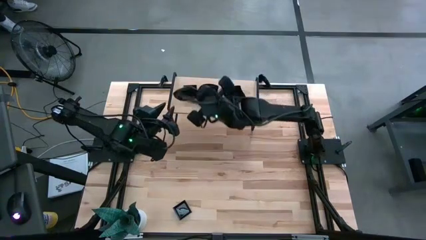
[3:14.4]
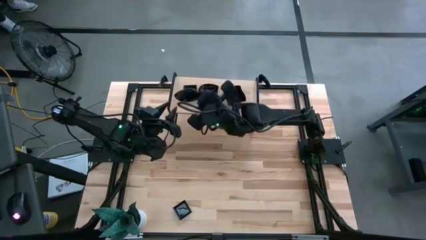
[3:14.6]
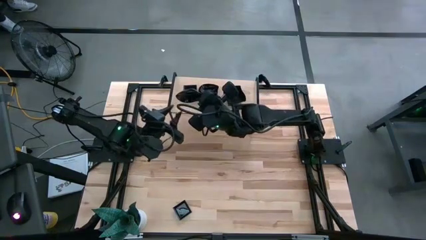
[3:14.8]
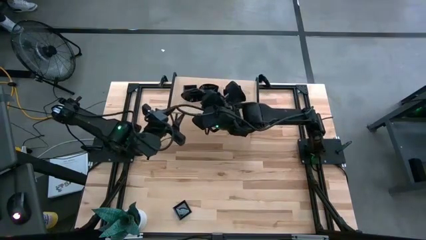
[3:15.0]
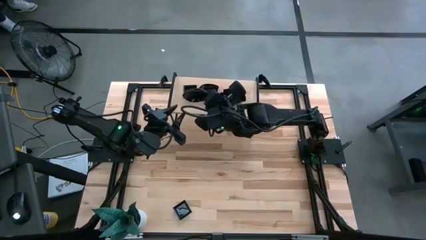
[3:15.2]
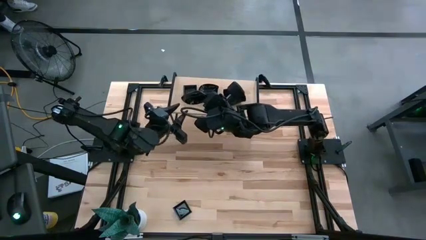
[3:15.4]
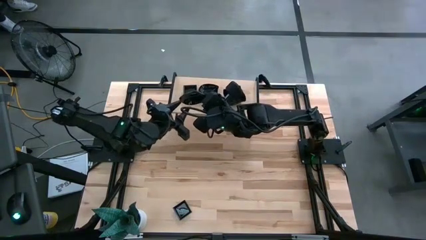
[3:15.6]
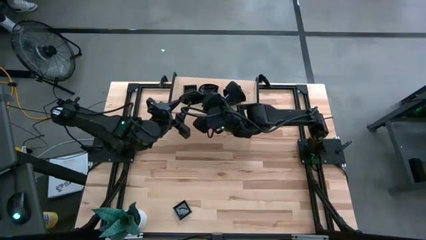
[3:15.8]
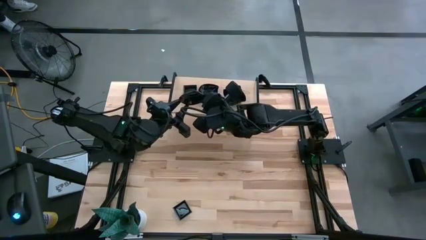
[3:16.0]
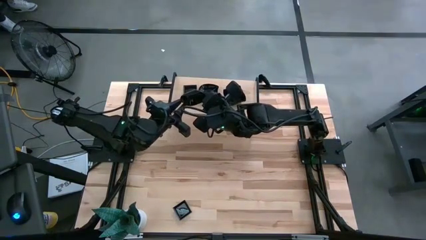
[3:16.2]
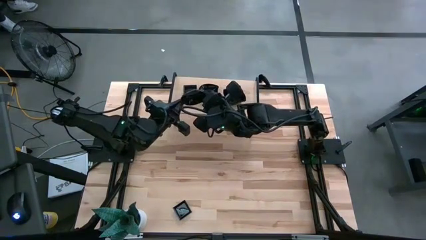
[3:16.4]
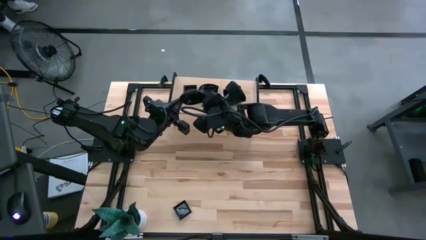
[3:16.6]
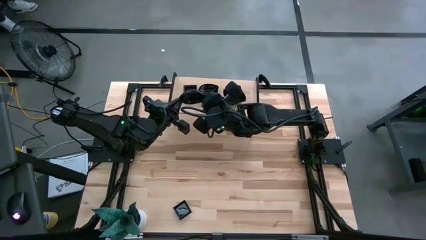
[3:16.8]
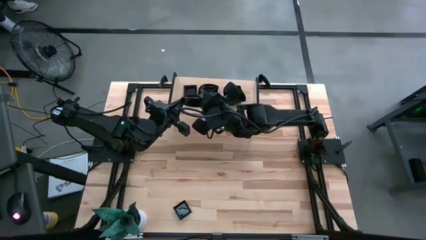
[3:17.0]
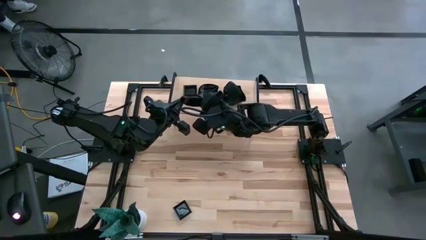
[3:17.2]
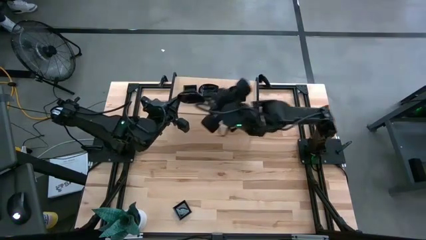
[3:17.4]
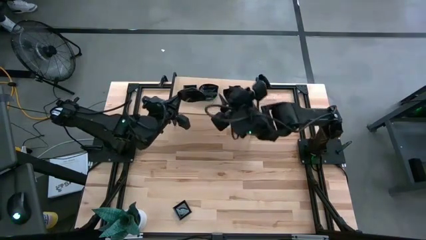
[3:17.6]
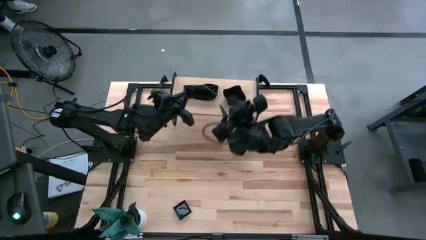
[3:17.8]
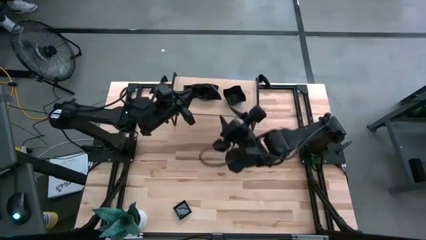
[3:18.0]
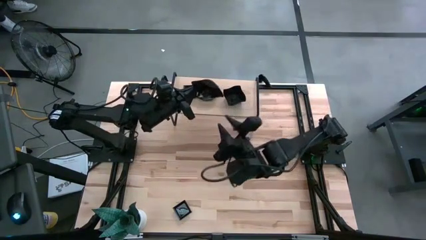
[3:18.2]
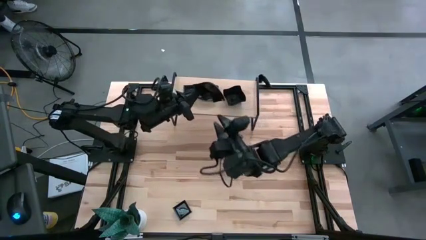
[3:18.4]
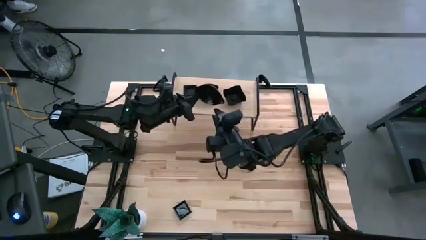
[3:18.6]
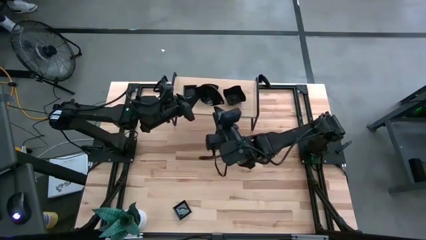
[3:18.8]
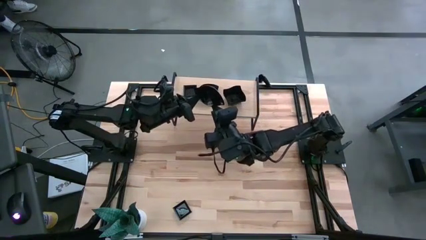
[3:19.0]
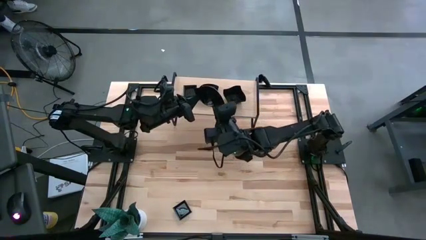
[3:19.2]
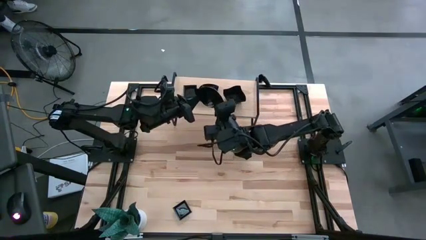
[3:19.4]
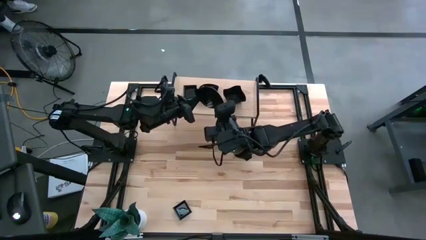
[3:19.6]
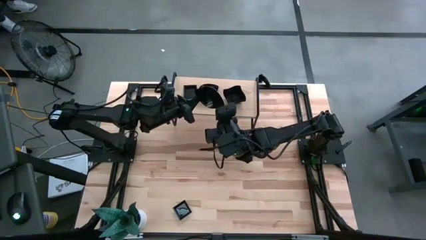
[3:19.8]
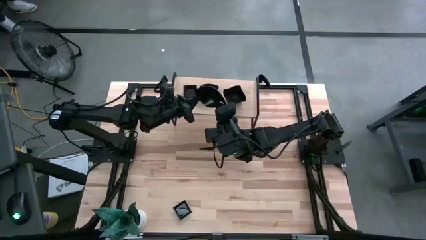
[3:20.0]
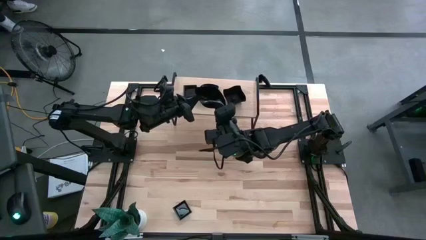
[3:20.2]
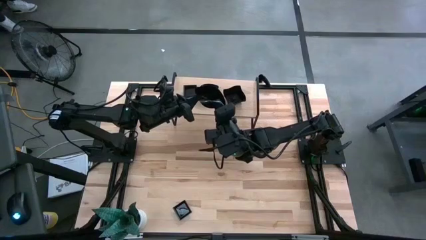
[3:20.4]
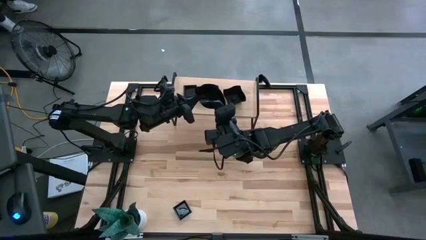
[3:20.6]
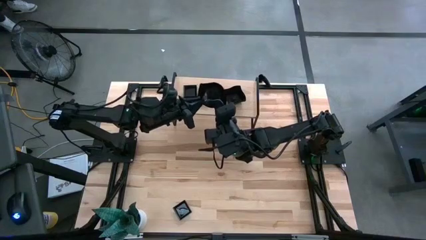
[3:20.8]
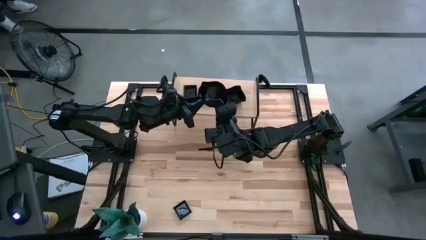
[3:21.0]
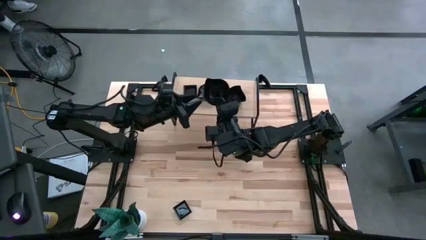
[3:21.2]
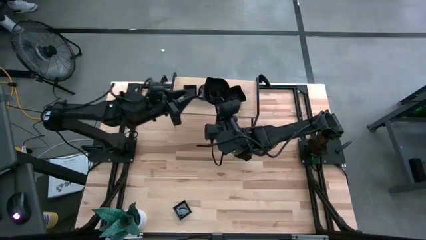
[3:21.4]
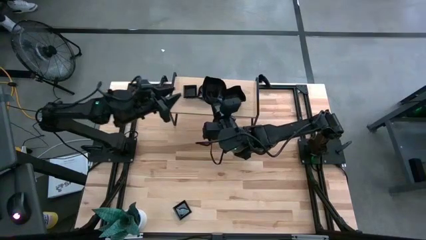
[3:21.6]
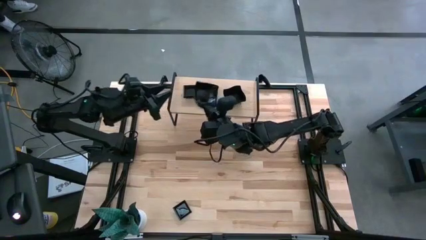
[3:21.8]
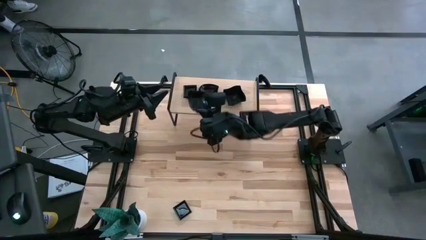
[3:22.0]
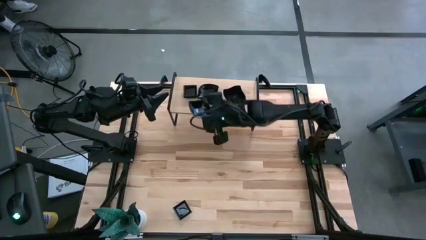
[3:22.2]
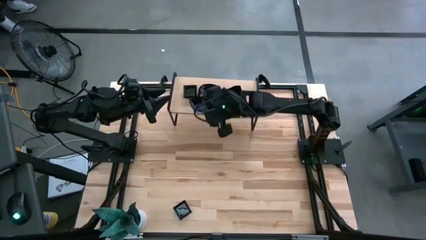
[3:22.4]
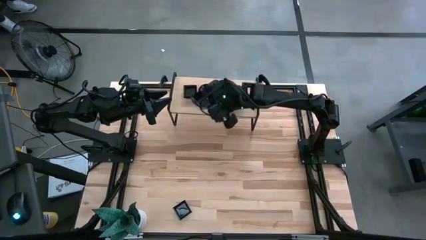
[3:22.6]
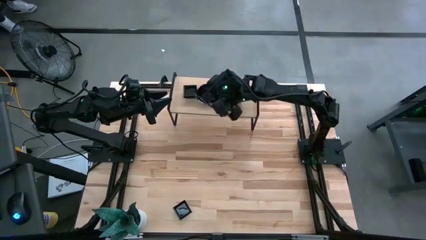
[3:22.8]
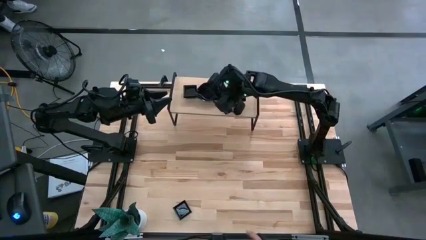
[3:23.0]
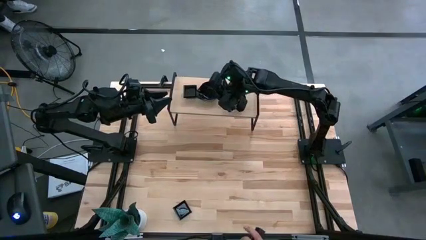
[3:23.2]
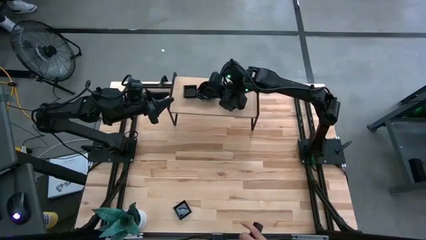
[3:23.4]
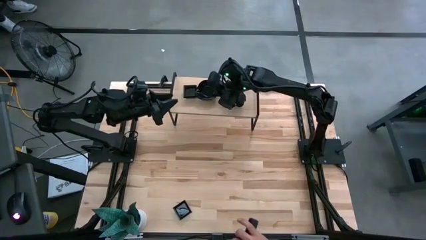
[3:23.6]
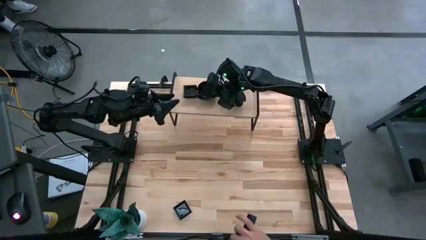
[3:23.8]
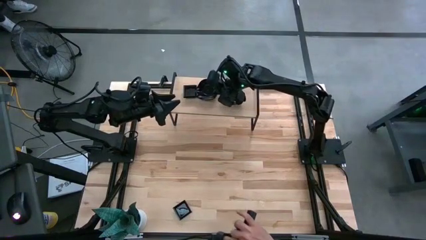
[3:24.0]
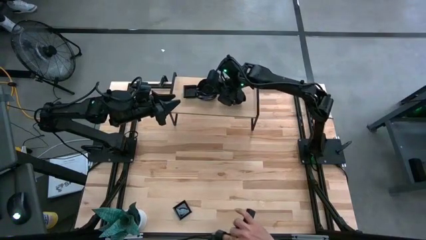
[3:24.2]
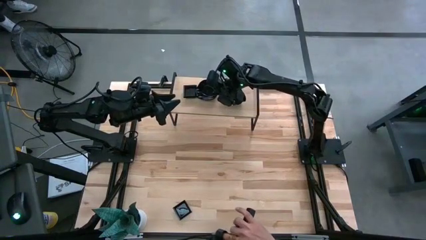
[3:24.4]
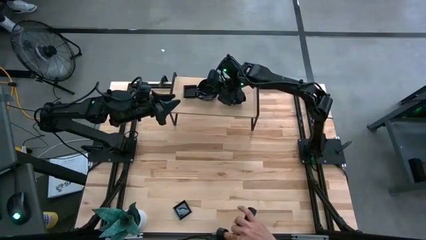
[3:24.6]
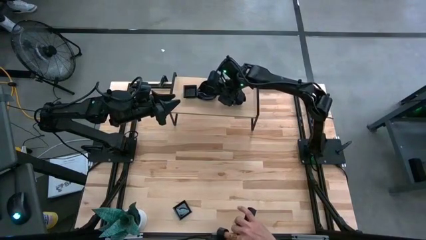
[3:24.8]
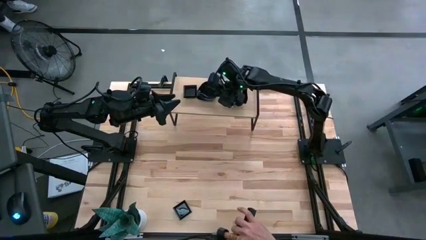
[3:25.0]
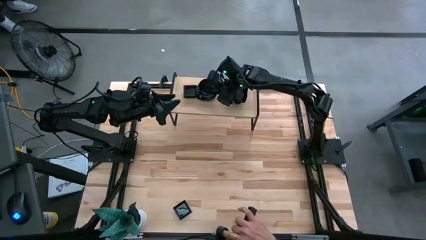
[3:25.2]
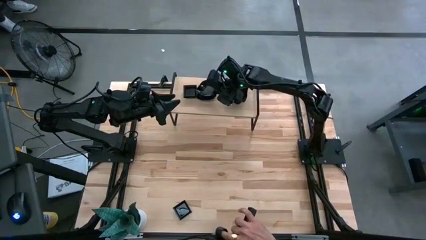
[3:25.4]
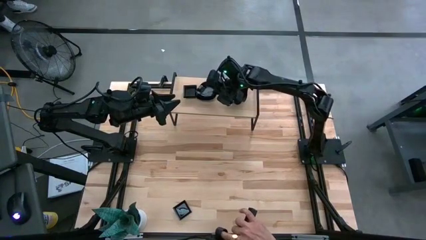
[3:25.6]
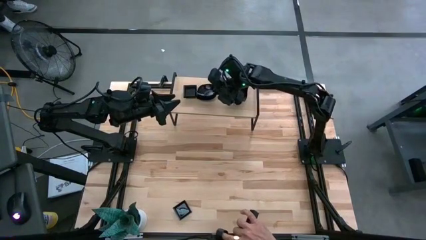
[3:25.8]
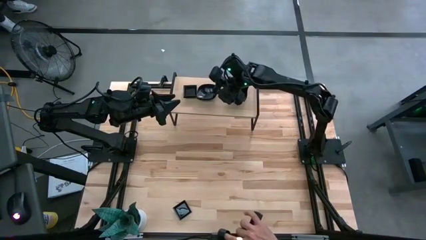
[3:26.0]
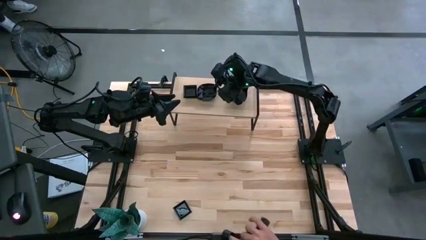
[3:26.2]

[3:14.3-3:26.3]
Task: Pick & Place Mini shaped plates
Stack the leaf-shaped plate on the leaf-shaped plate
